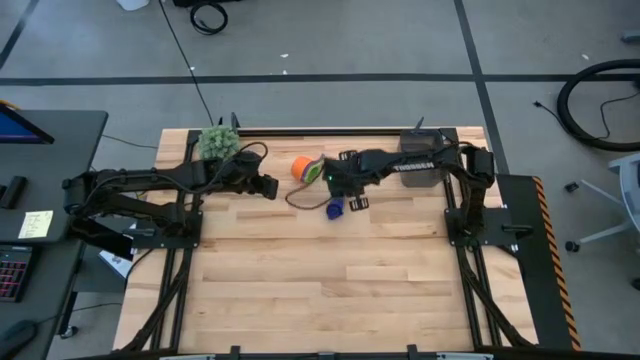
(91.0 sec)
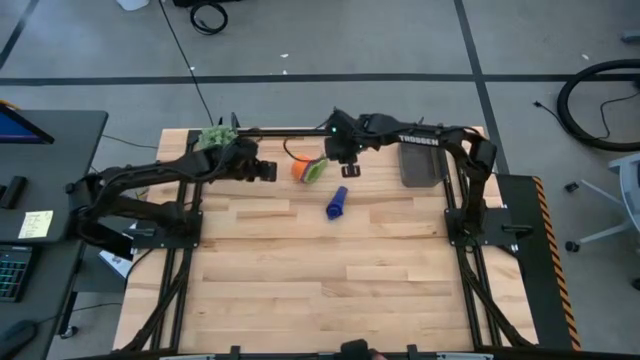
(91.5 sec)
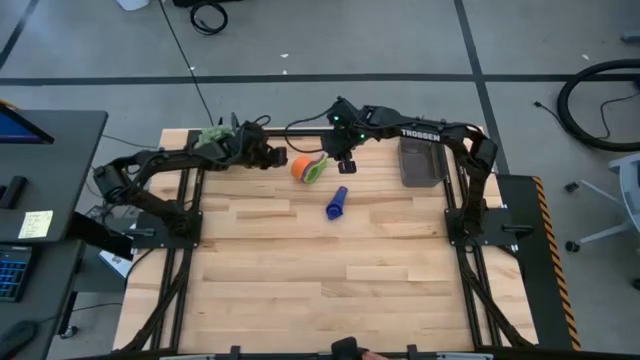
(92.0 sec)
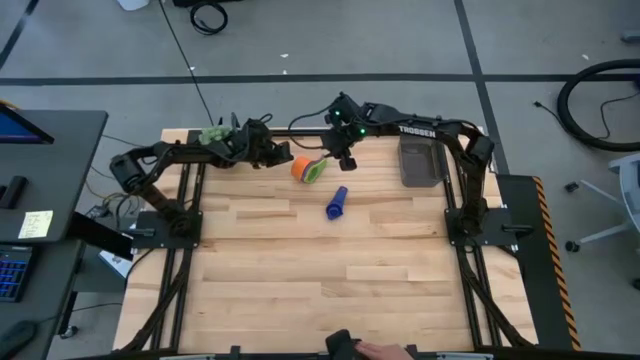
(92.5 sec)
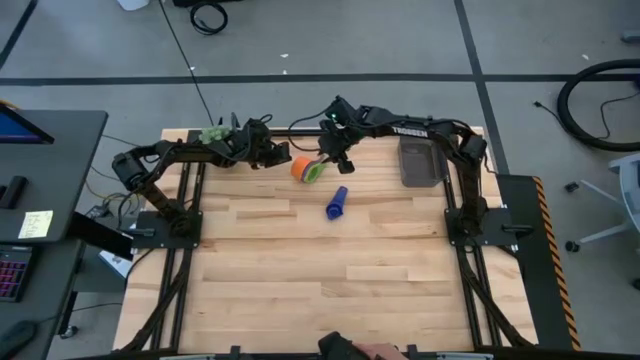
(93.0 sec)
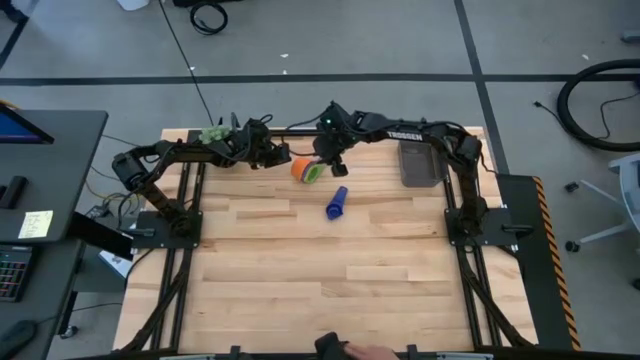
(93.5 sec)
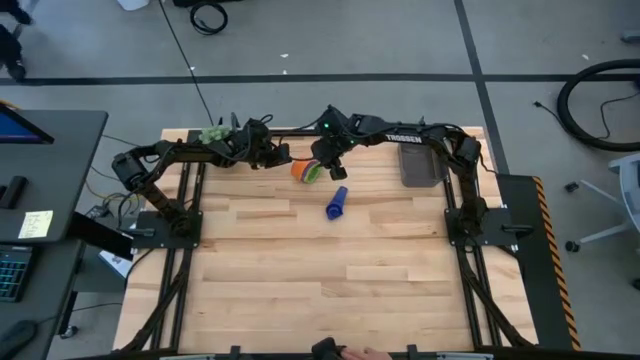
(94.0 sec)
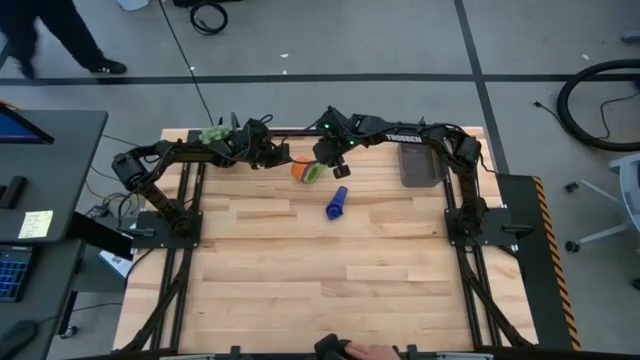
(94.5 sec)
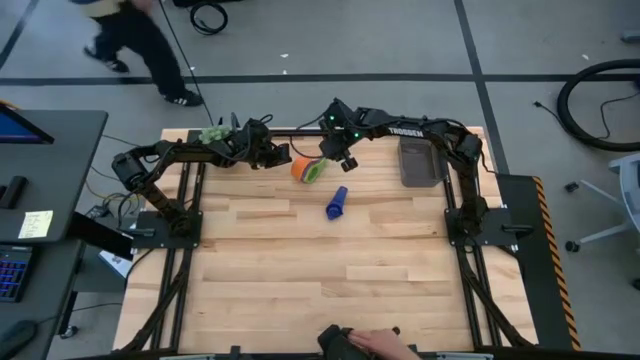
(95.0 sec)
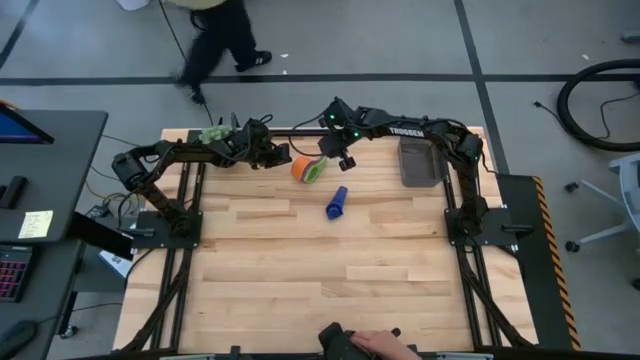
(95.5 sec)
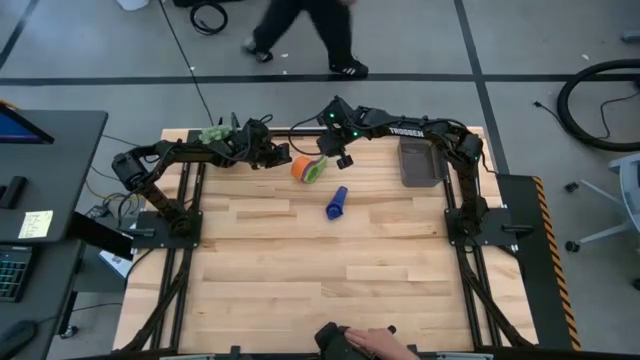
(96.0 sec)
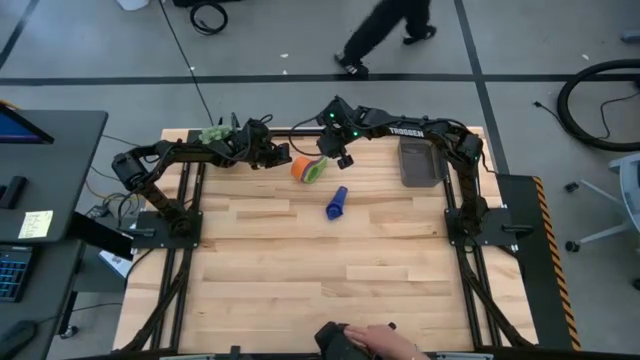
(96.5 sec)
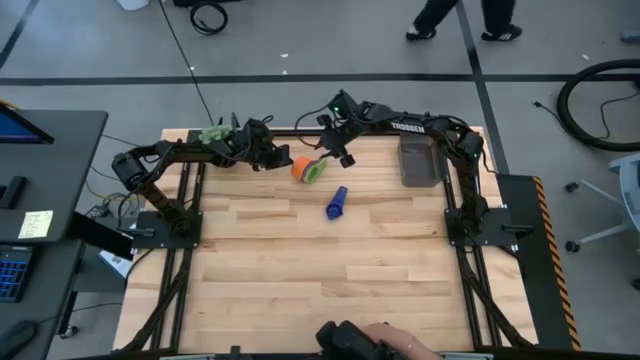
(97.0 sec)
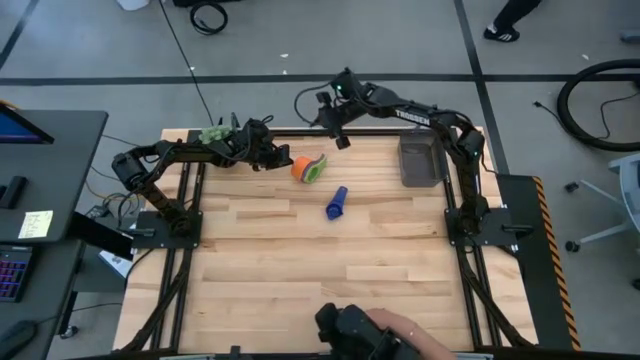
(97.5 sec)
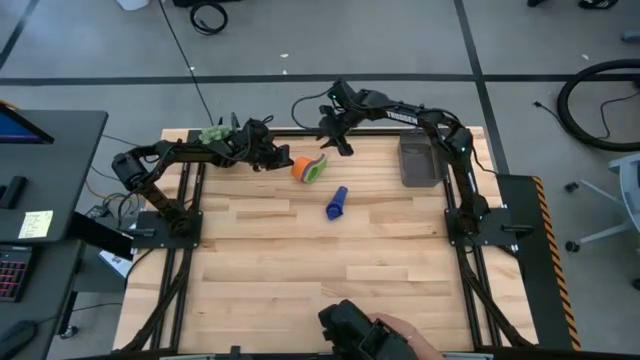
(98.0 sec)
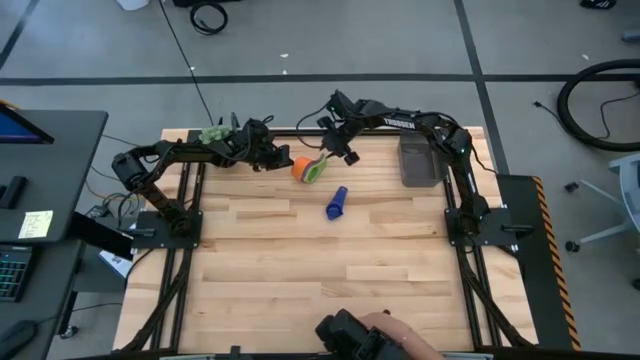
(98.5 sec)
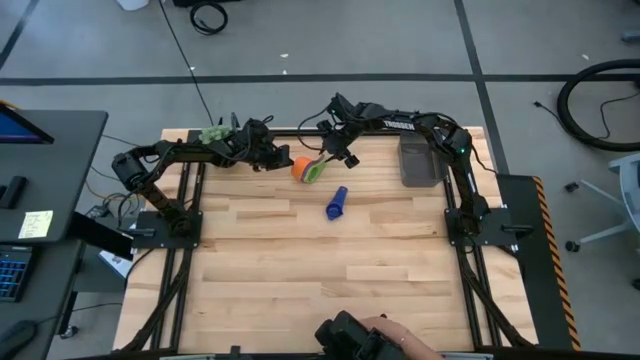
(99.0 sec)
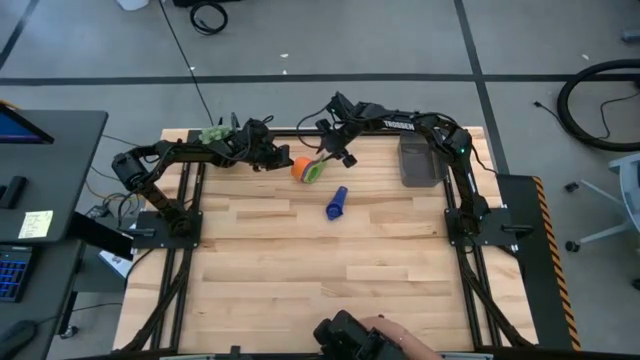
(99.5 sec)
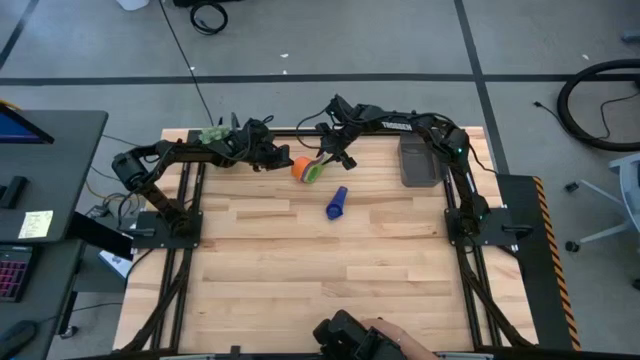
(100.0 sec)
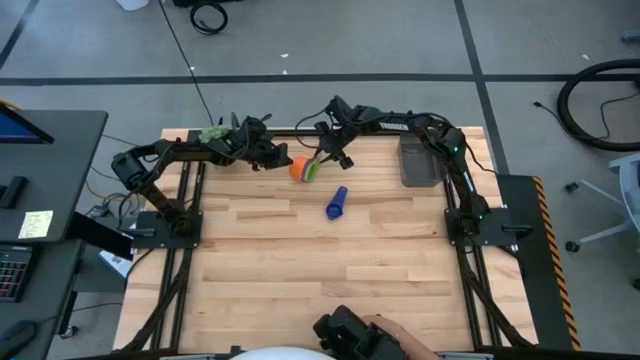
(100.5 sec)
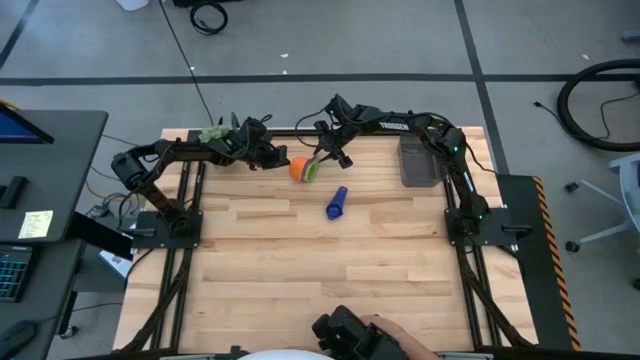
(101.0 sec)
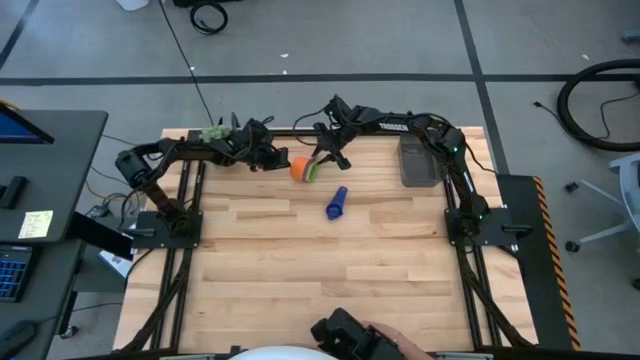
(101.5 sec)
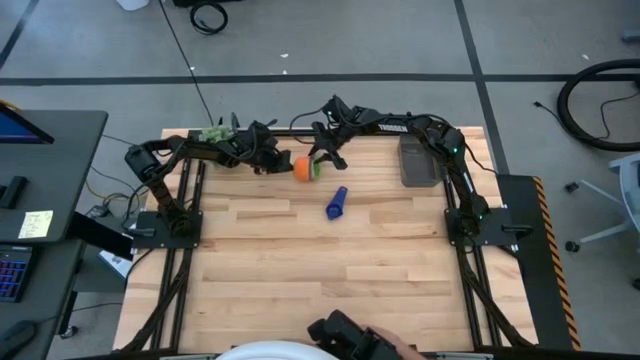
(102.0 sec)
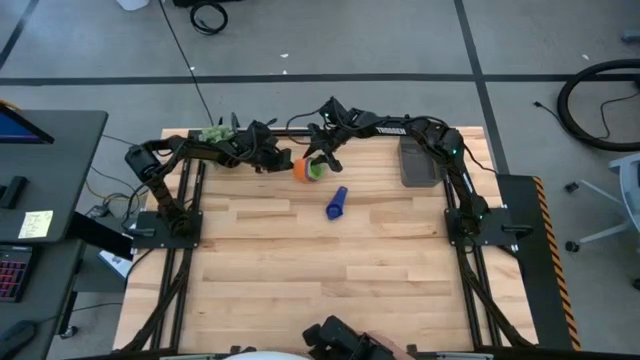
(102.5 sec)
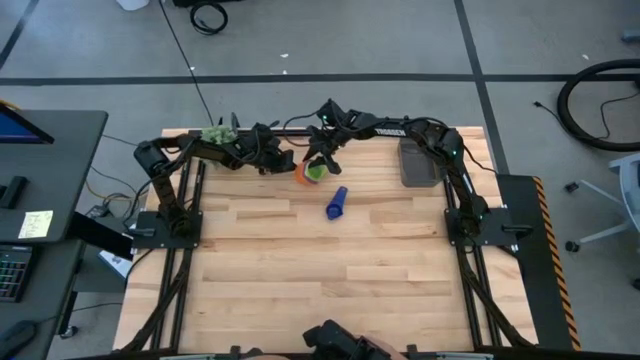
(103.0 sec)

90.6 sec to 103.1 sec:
Task: Nest measuring cups in basket
Put the stack of measuring cups into the black bin

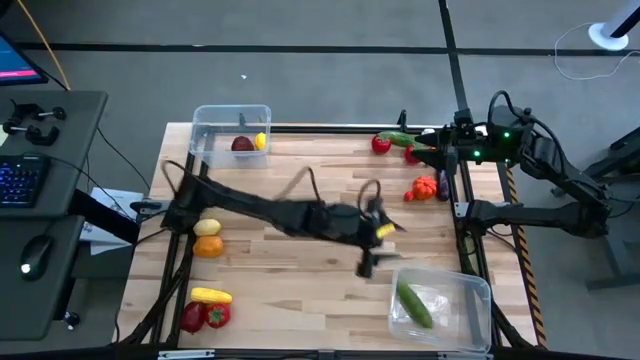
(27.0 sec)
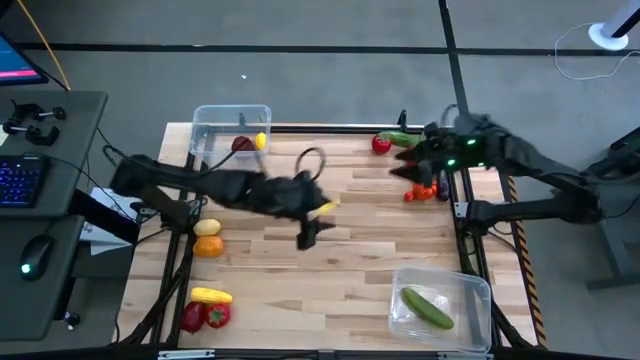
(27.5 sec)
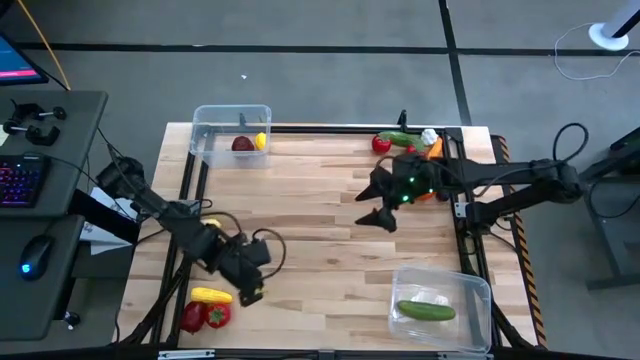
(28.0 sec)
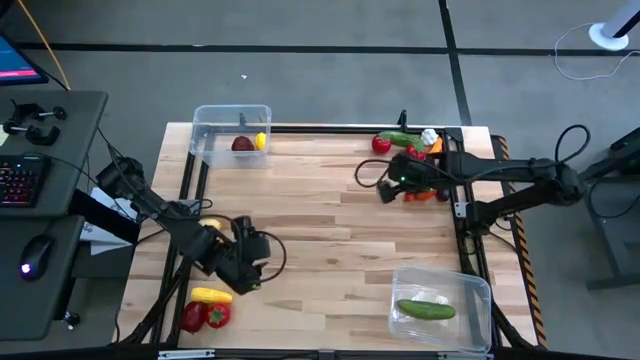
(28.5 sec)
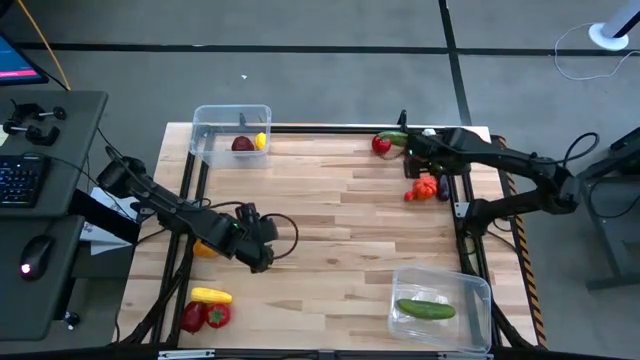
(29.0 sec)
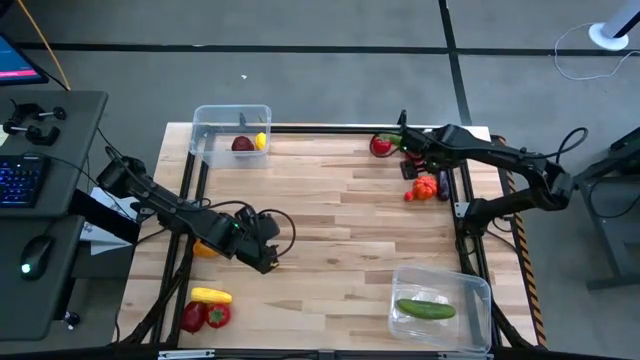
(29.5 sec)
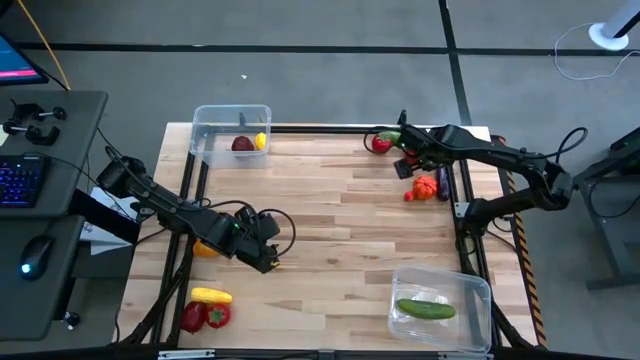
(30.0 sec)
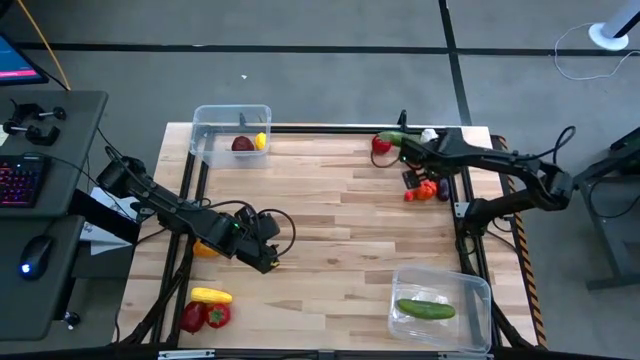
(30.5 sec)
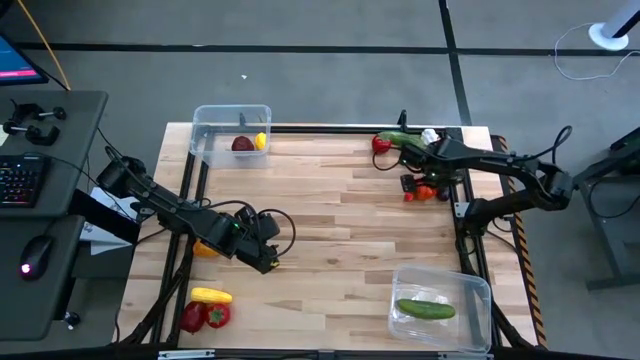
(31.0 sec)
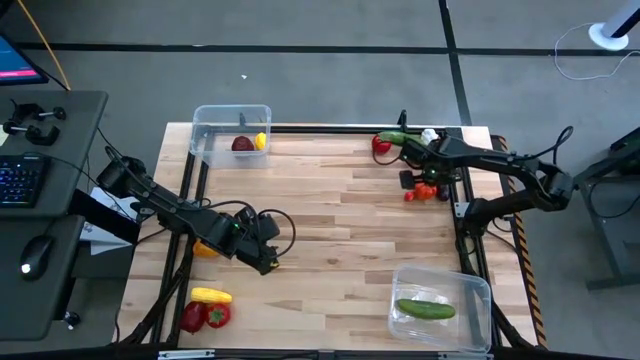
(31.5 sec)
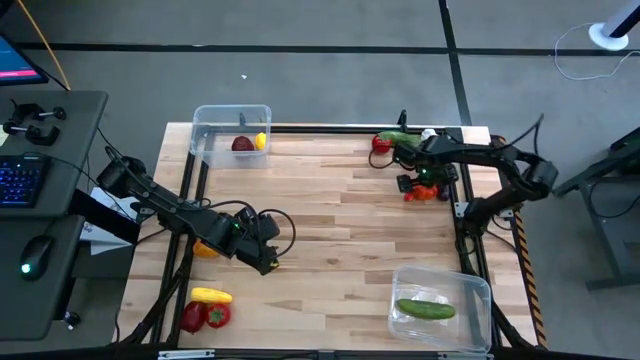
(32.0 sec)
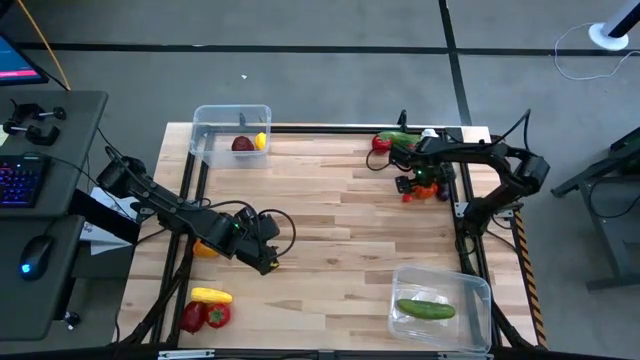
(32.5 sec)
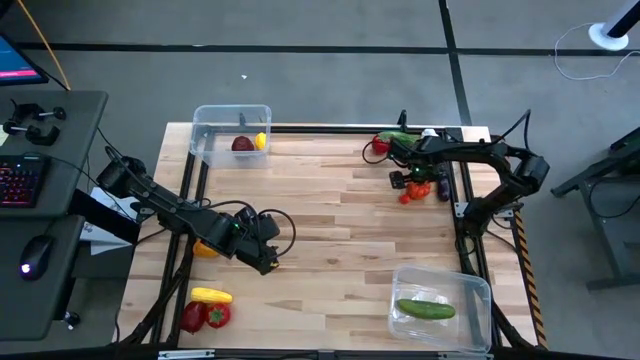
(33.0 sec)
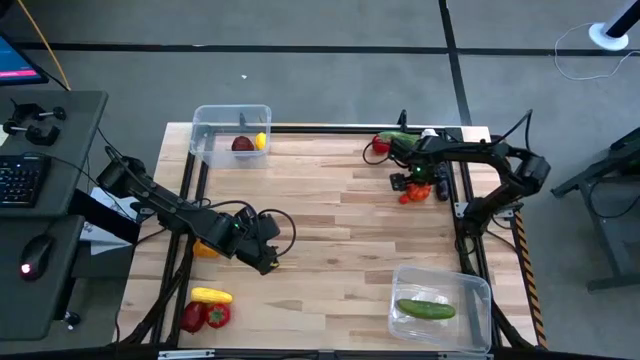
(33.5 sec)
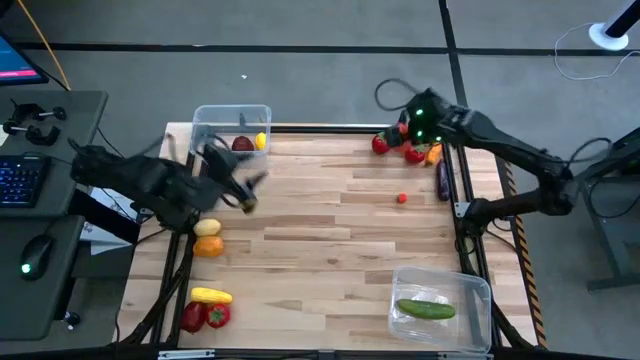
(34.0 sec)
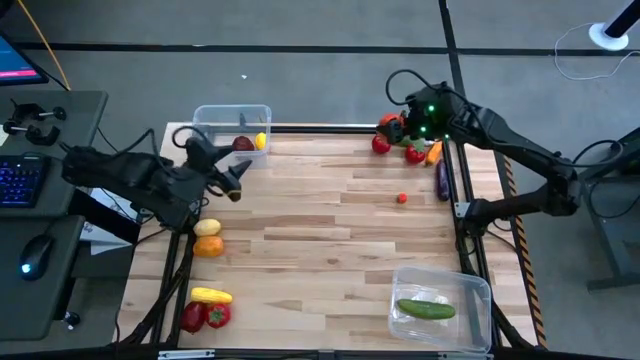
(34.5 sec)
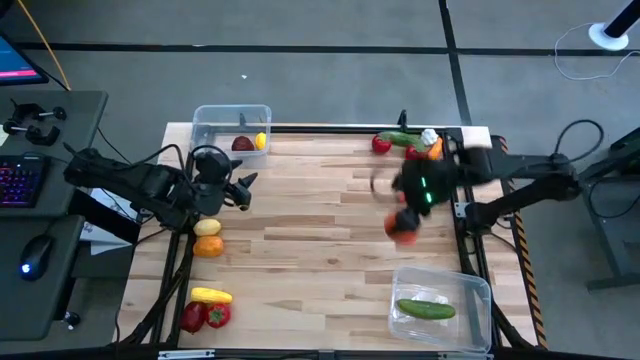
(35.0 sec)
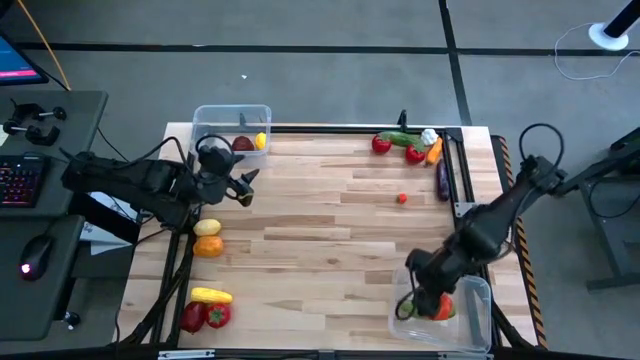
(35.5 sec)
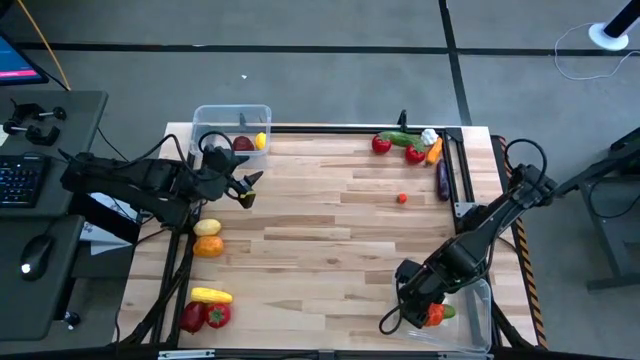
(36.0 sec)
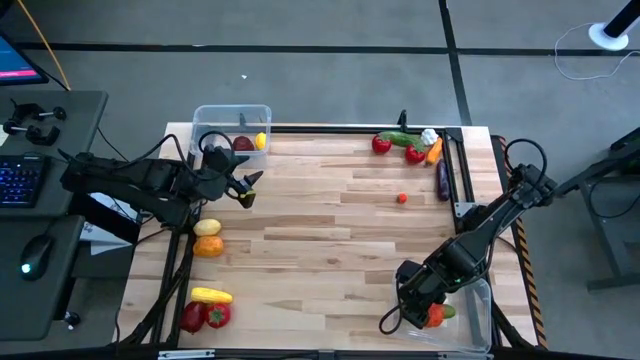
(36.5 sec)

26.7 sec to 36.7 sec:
Task: Sort produce into baskets
Put the orange pumpkin into the bottom transparent bin
